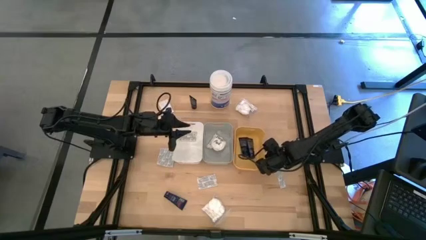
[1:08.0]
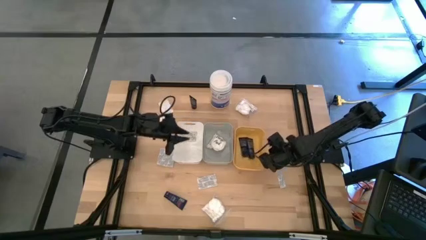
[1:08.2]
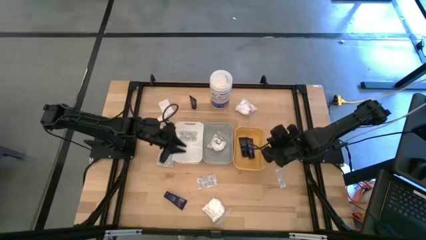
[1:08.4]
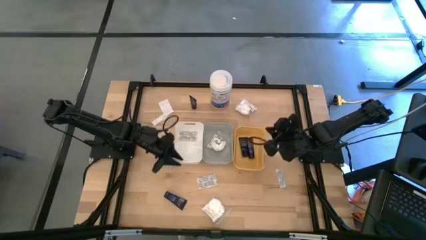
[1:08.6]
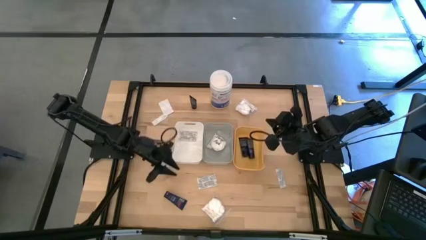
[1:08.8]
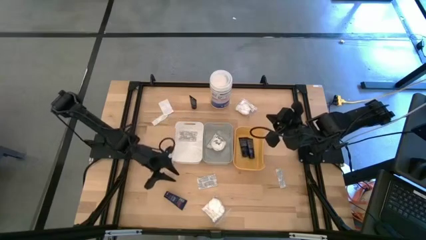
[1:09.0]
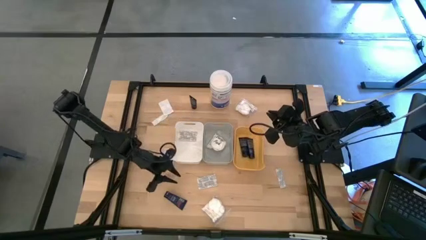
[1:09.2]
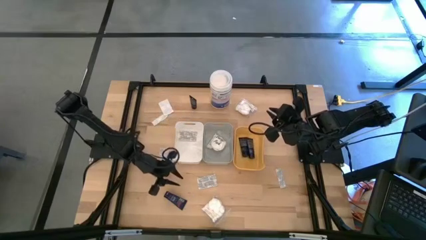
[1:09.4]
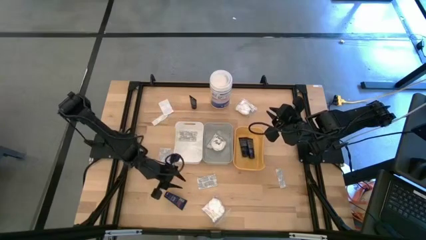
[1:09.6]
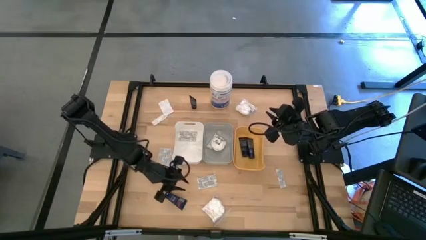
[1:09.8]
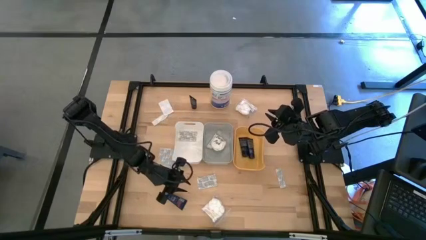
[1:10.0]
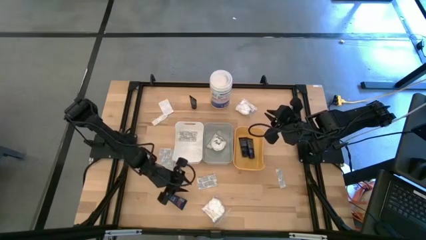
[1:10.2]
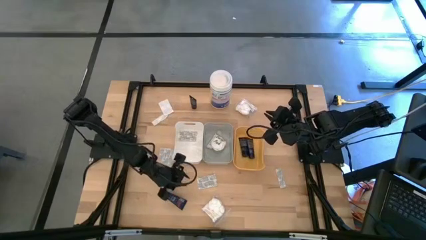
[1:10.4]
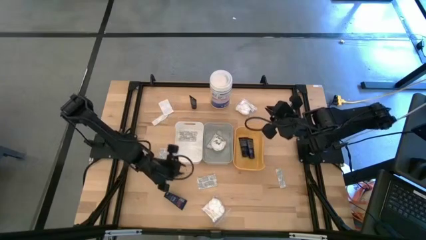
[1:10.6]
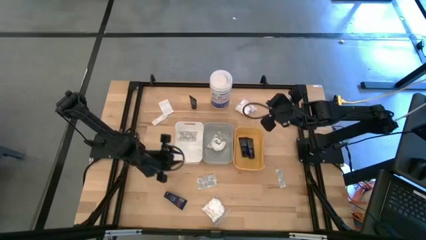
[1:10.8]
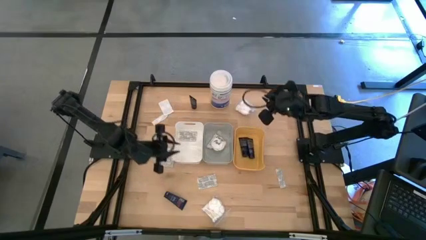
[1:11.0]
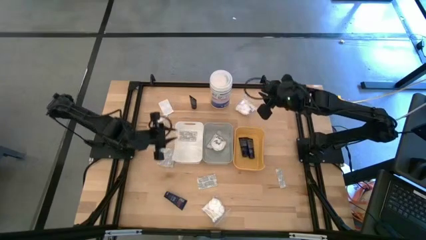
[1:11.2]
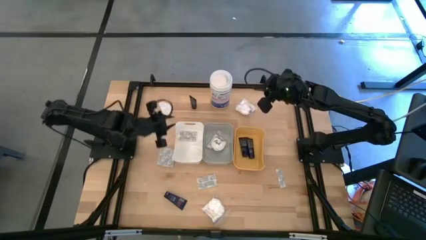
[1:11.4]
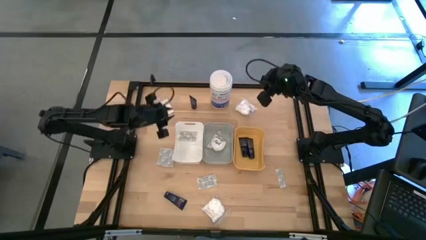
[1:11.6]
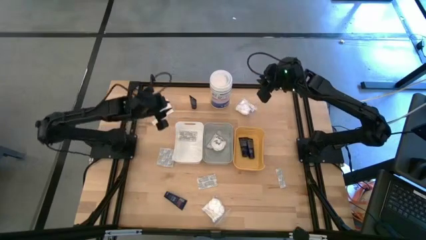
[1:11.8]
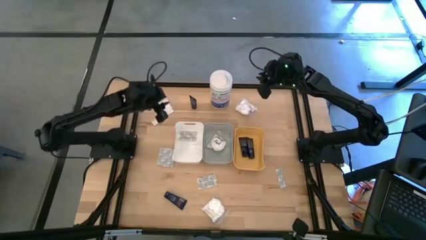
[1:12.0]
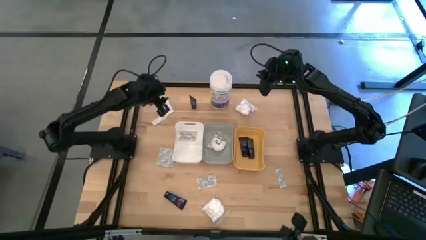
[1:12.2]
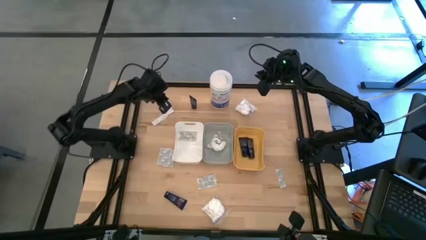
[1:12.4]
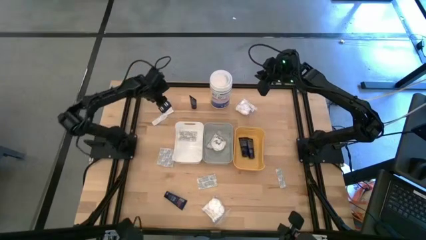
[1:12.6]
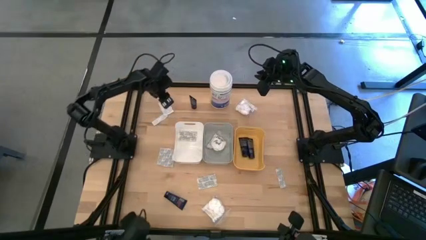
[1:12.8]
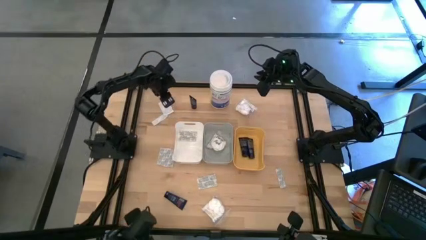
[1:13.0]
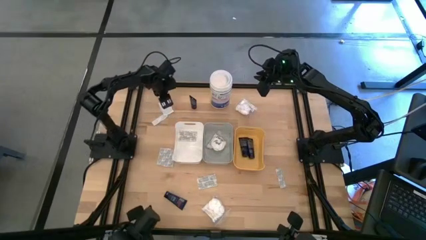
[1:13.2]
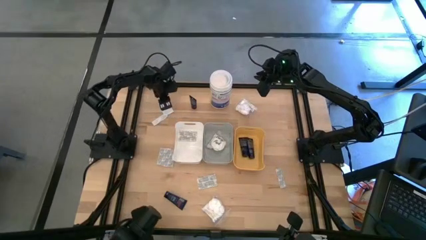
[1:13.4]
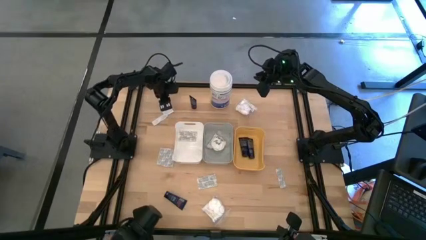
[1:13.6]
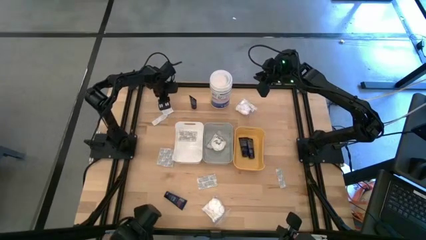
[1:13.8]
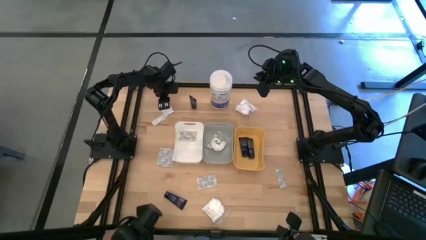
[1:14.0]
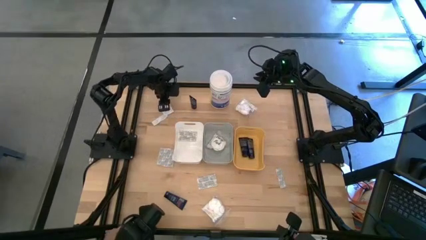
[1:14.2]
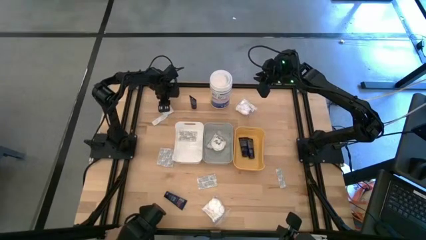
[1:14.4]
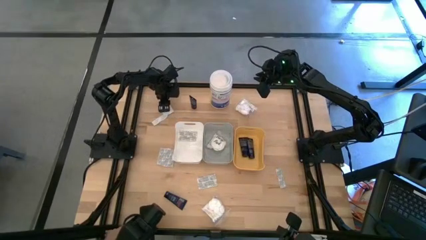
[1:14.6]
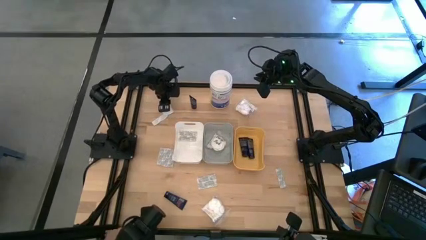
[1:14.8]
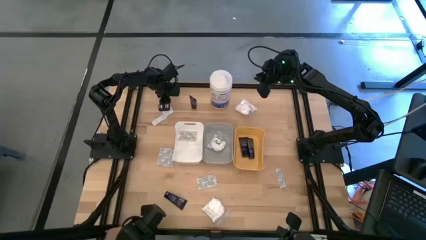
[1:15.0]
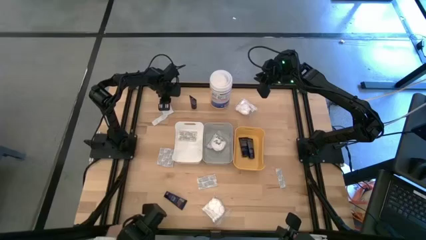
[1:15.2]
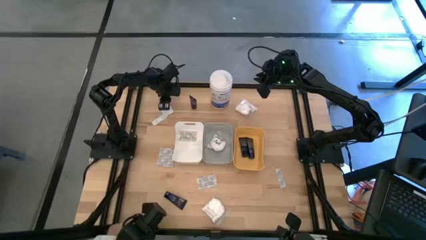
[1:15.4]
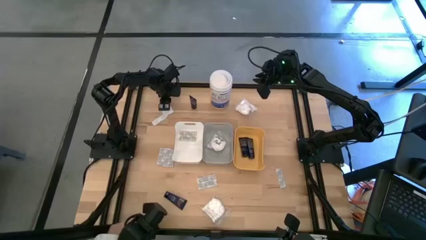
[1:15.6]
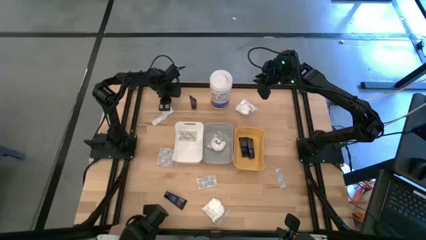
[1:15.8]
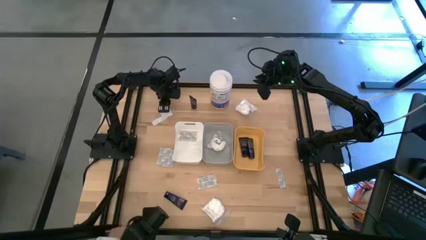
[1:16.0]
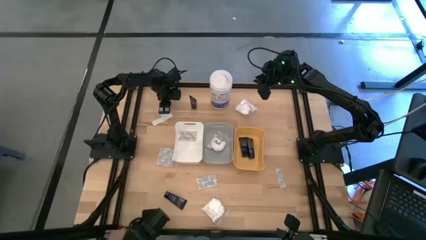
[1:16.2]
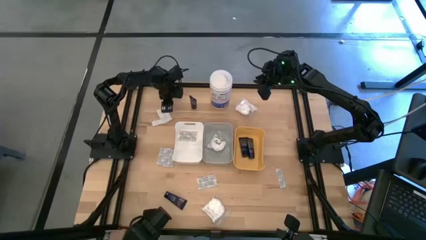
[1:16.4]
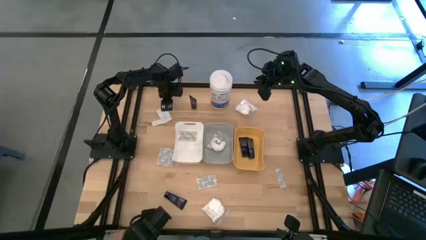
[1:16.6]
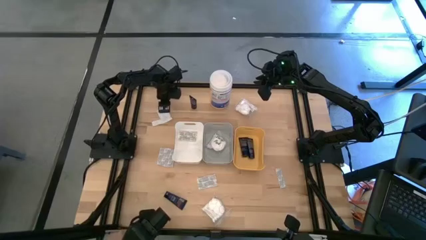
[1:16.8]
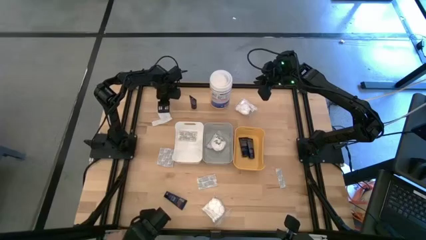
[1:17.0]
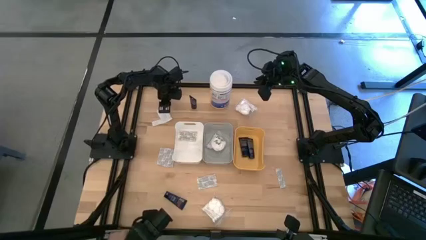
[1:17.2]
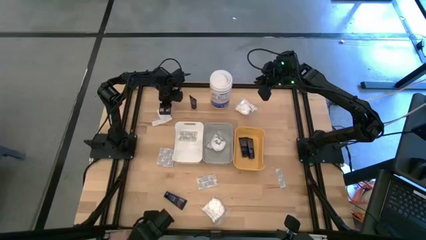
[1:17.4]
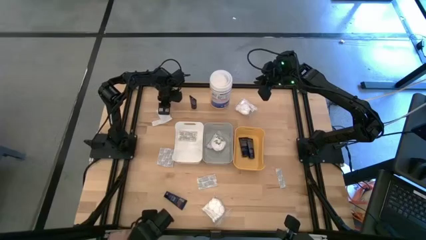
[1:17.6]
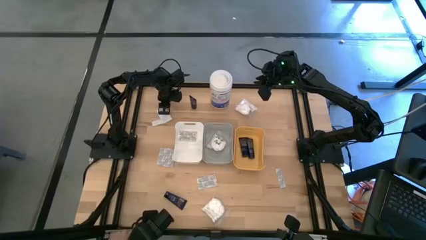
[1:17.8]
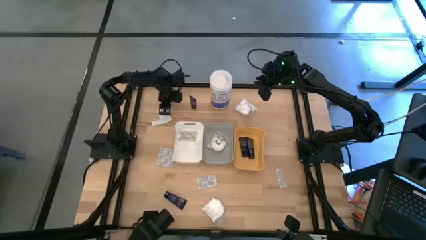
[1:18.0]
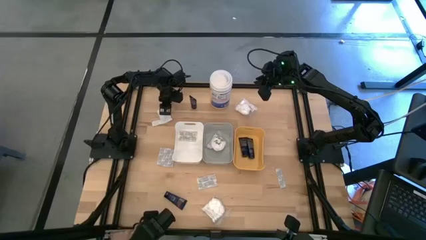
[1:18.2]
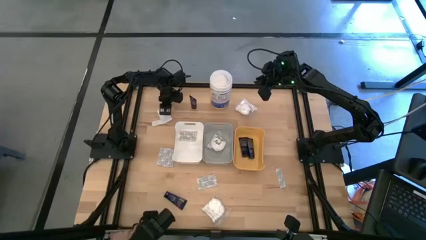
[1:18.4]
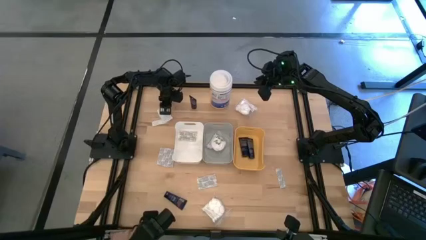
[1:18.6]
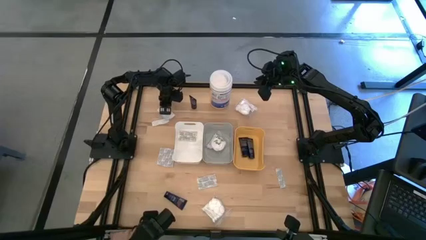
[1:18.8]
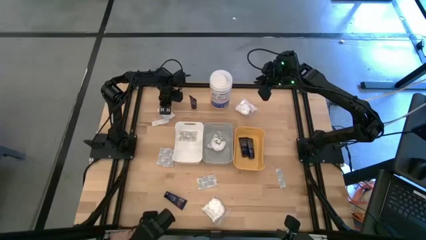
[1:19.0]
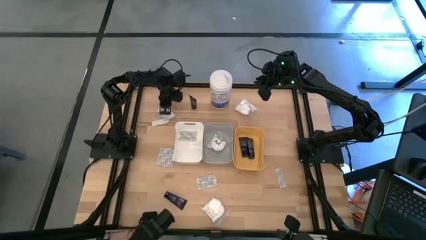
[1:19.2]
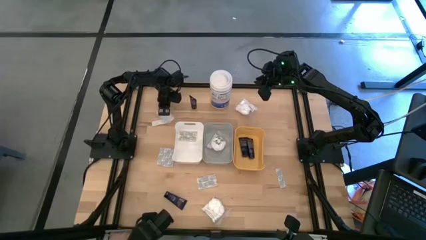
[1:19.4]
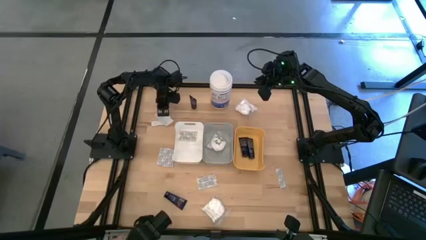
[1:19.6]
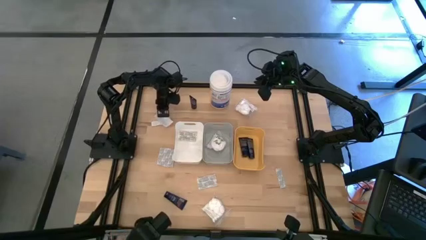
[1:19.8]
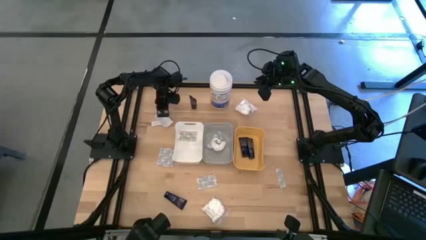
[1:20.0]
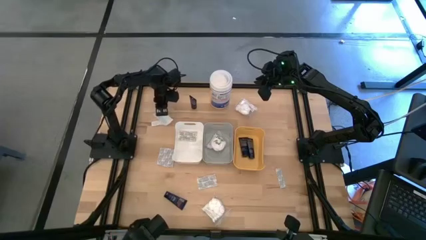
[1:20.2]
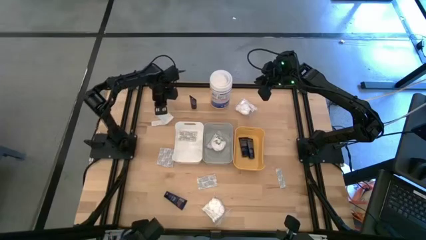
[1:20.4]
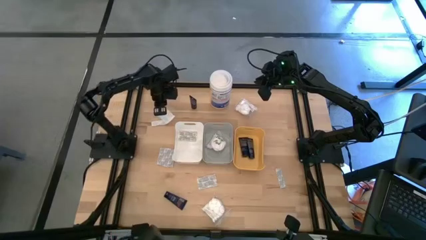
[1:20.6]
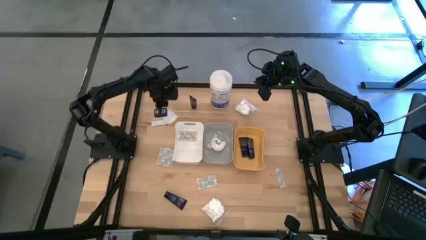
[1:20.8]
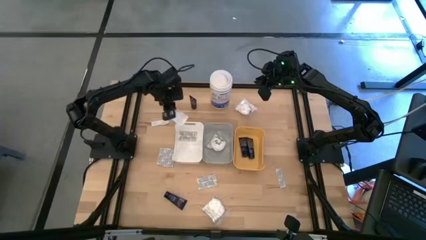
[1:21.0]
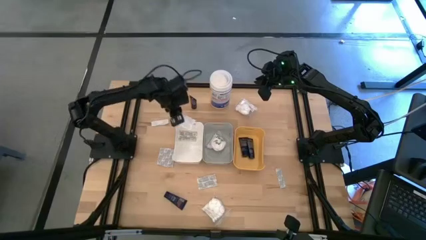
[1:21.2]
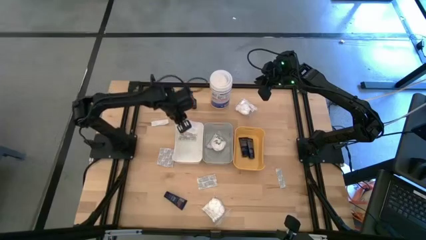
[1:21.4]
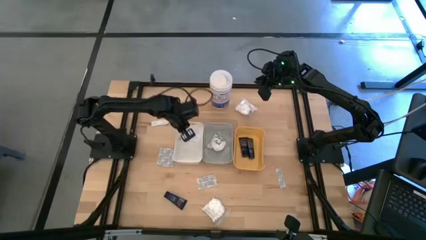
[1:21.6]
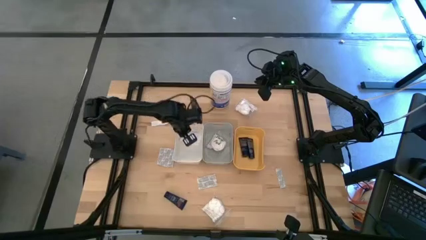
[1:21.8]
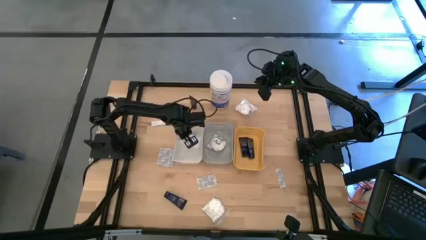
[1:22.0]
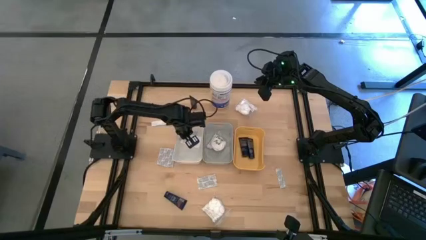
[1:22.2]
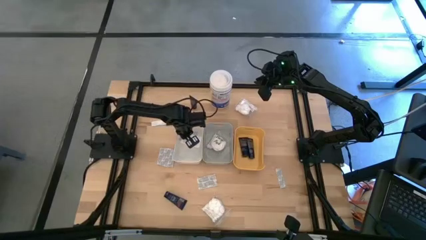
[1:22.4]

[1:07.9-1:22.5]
Task: Pick & Place Travel size toiletries
Put the white band-aid into the white bin

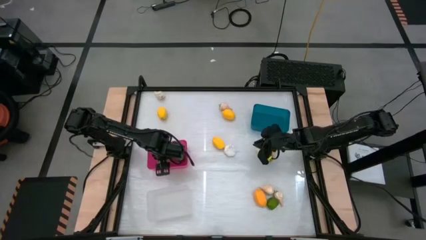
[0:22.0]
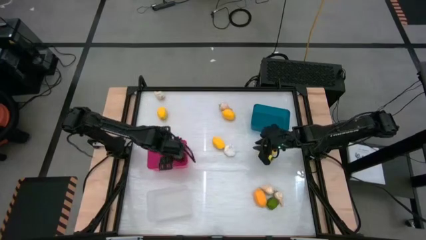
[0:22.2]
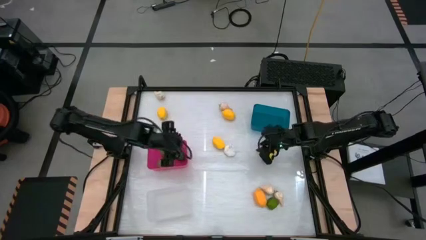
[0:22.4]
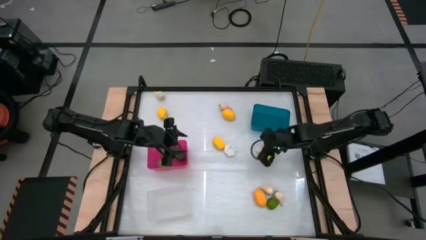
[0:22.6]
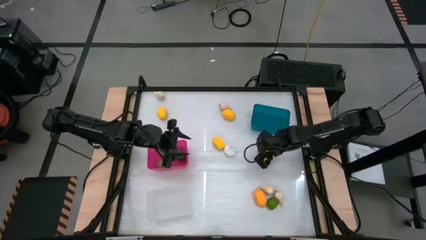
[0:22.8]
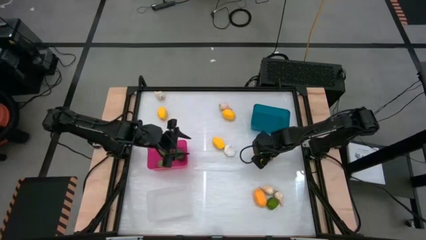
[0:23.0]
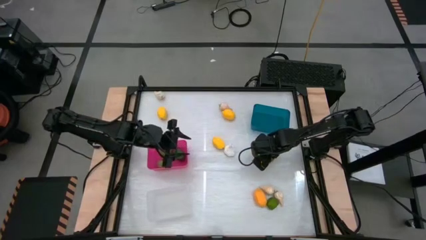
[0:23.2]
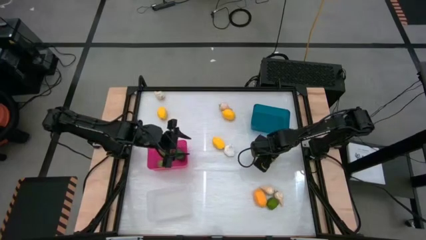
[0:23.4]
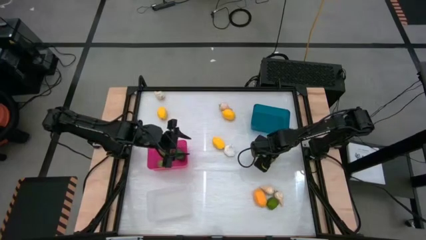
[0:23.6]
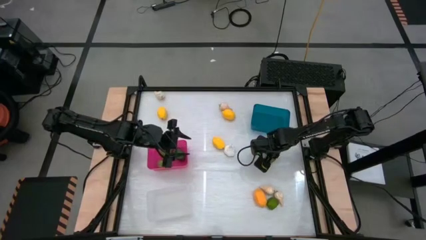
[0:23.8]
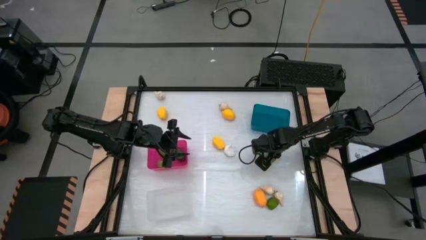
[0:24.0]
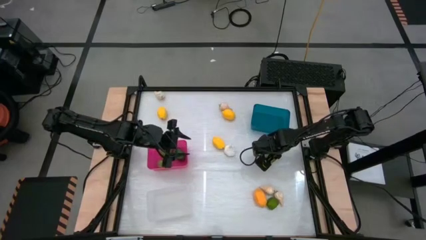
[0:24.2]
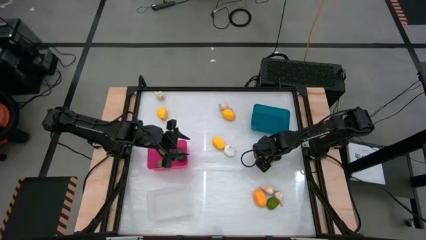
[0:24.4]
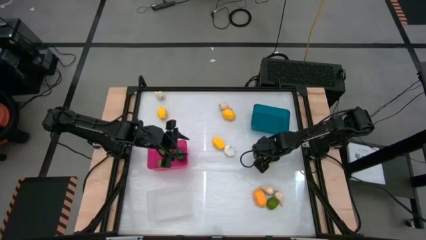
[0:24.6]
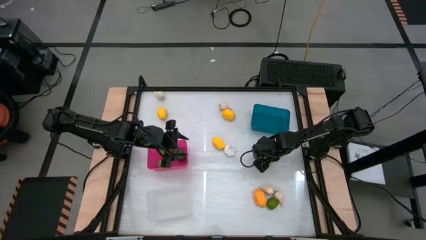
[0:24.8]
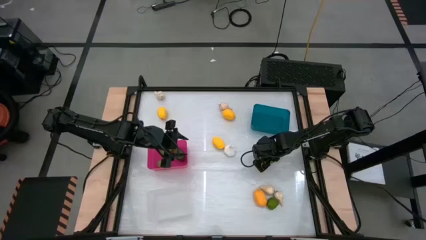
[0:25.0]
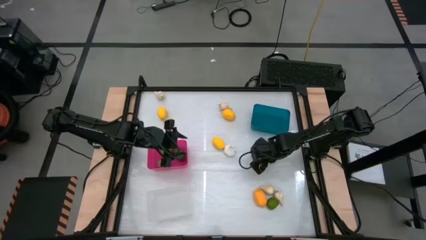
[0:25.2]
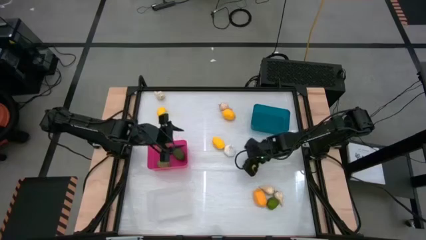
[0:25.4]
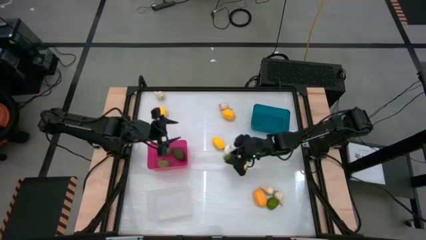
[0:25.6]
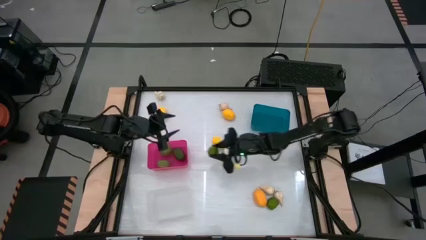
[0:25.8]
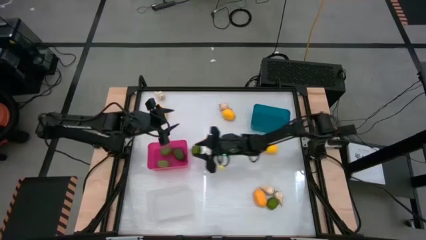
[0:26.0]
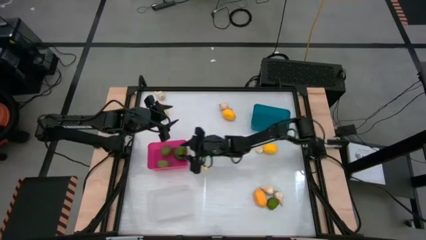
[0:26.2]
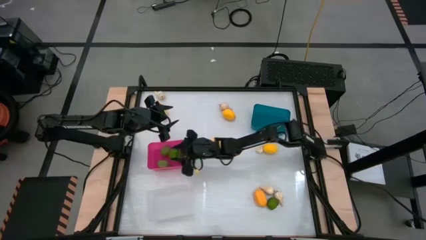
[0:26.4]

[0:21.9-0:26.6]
Task: Sort produce into baskets
Put the lime into the pink bin
